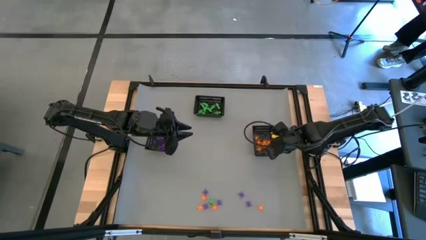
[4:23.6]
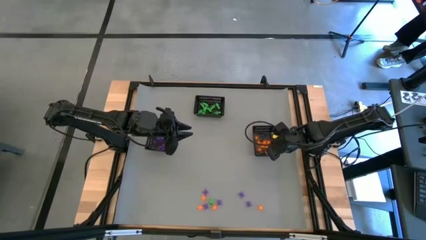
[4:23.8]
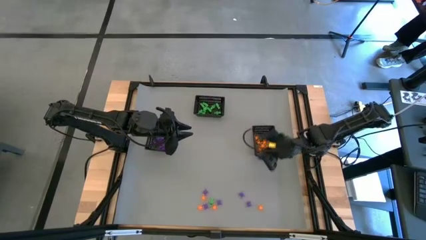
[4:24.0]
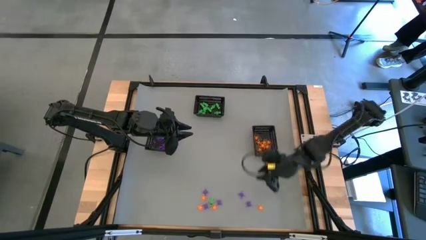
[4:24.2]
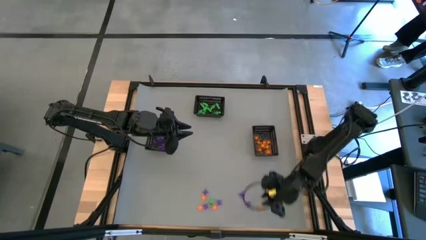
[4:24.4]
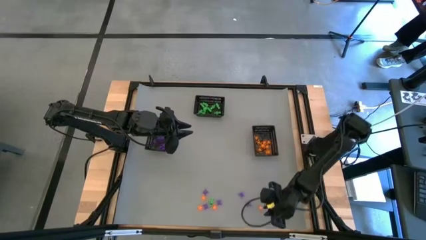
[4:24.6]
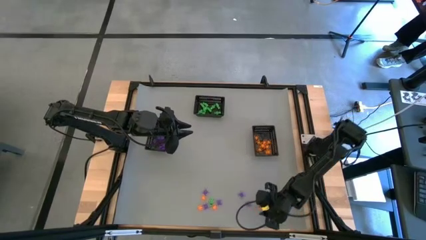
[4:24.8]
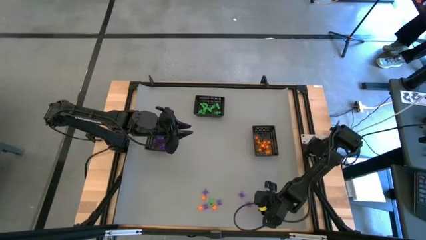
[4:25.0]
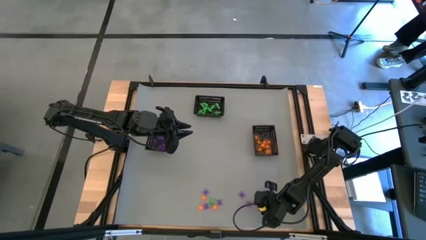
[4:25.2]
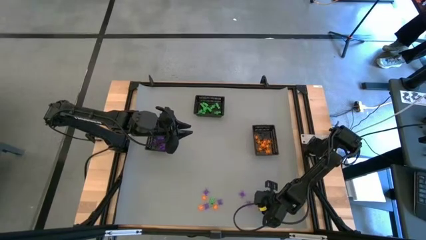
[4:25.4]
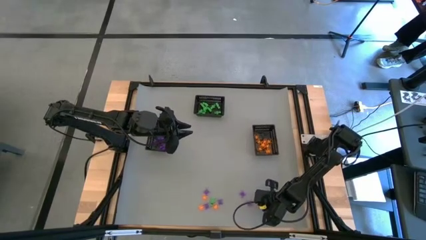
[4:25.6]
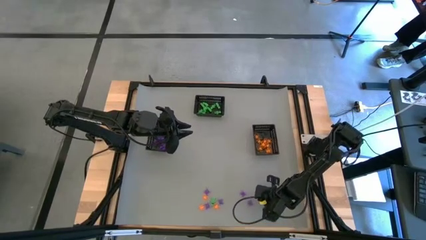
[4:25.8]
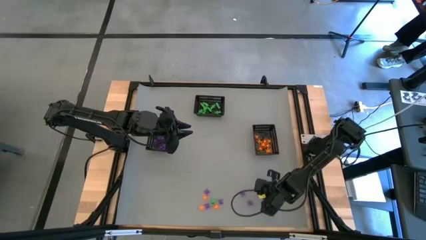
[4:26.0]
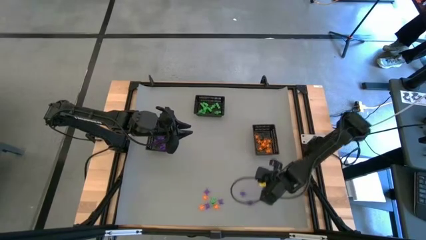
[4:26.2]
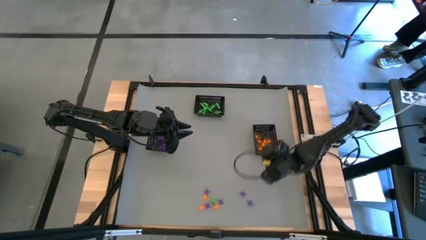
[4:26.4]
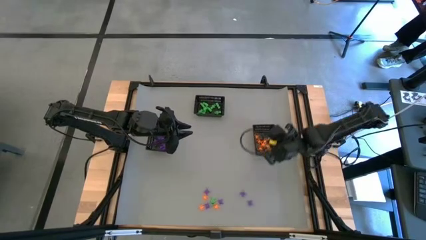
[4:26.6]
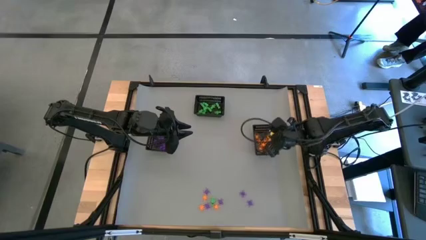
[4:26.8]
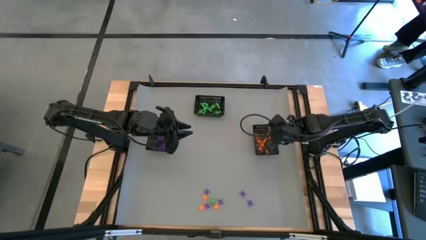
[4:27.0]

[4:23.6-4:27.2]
Task: Sort Halloween decoration
Put the orange spider toy into the right bin

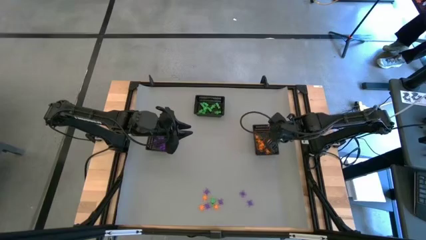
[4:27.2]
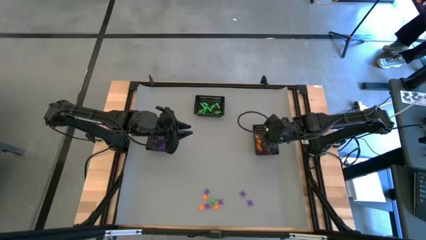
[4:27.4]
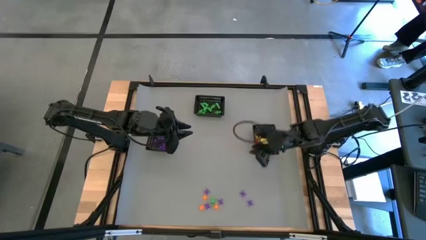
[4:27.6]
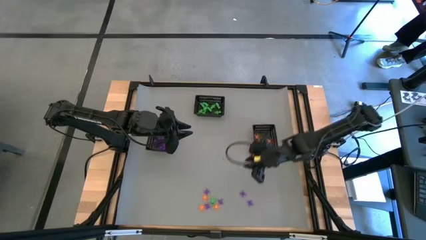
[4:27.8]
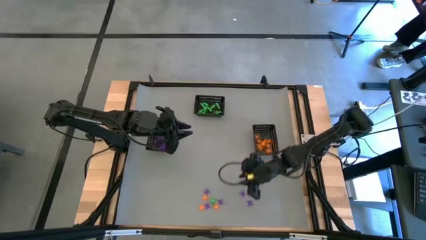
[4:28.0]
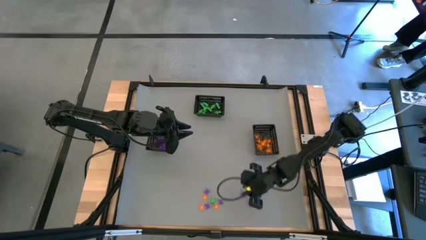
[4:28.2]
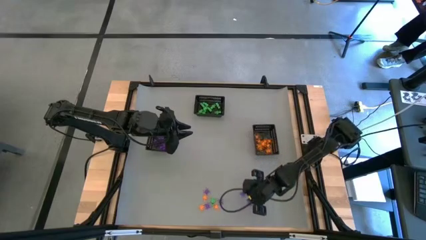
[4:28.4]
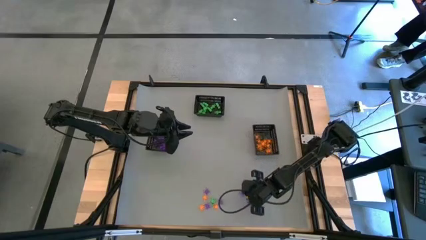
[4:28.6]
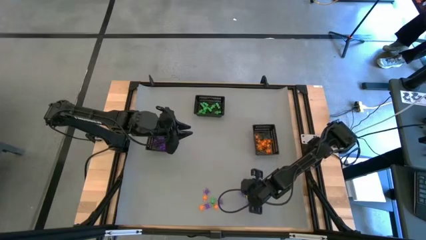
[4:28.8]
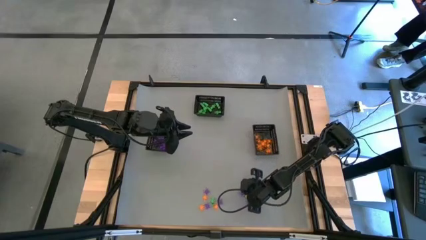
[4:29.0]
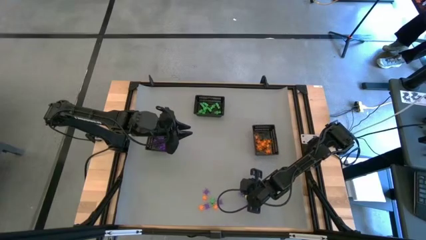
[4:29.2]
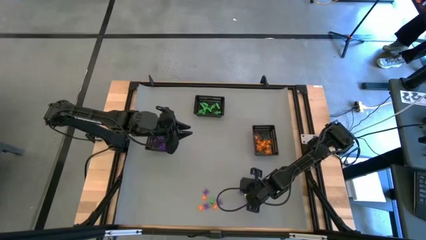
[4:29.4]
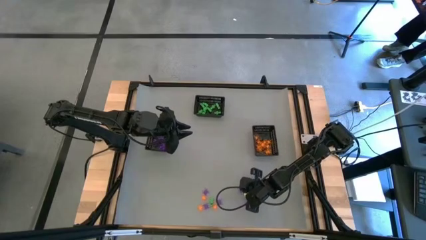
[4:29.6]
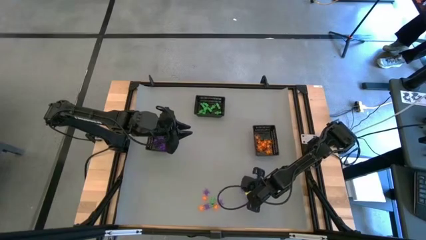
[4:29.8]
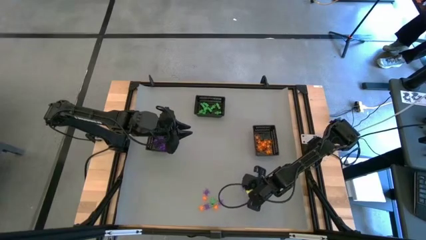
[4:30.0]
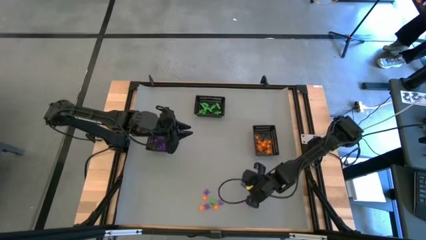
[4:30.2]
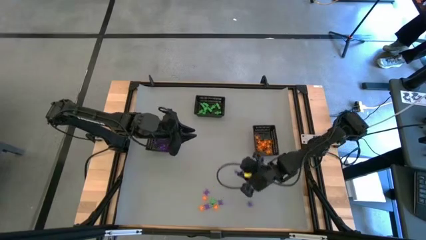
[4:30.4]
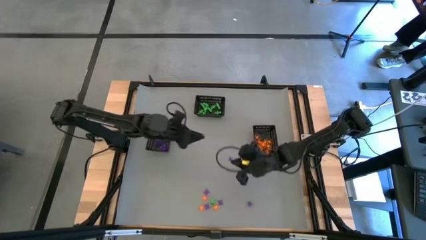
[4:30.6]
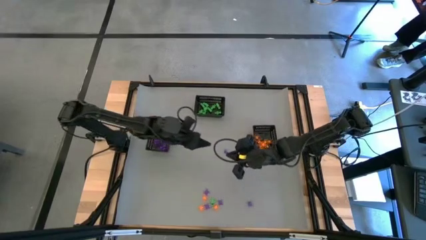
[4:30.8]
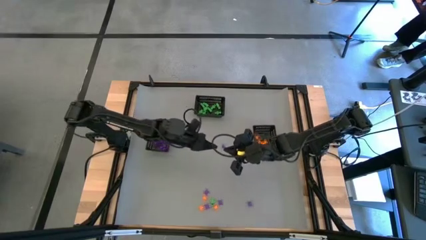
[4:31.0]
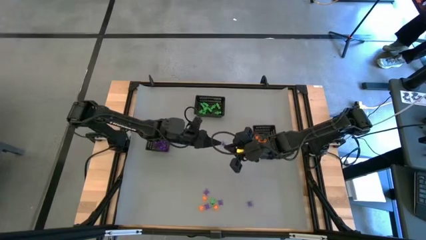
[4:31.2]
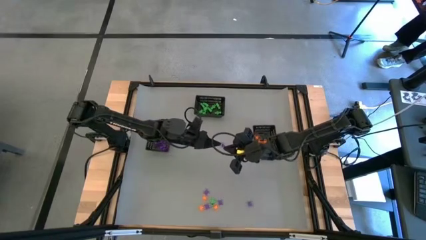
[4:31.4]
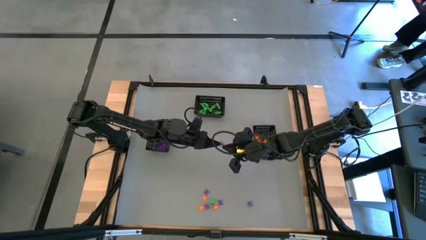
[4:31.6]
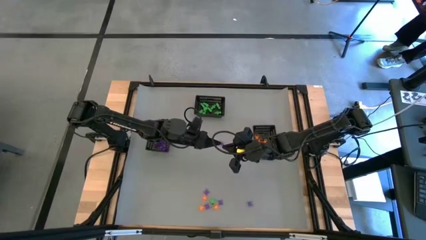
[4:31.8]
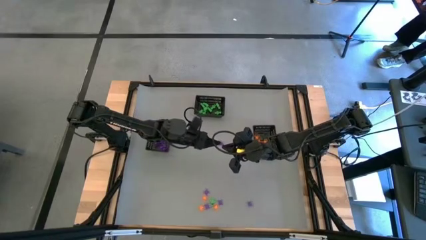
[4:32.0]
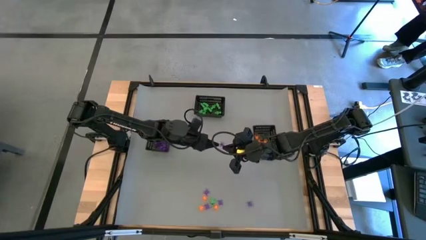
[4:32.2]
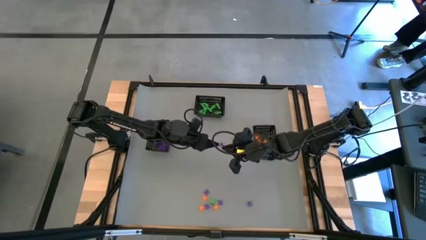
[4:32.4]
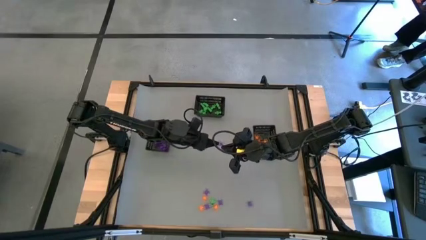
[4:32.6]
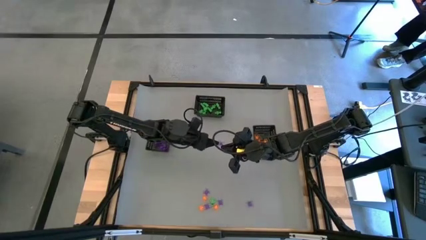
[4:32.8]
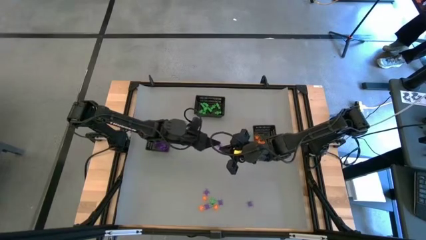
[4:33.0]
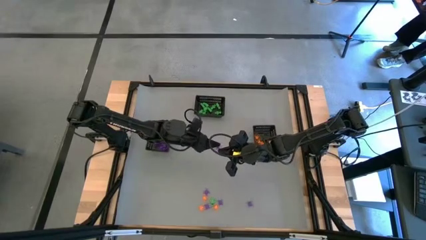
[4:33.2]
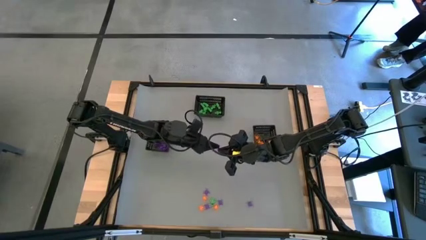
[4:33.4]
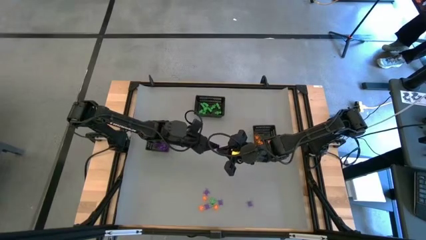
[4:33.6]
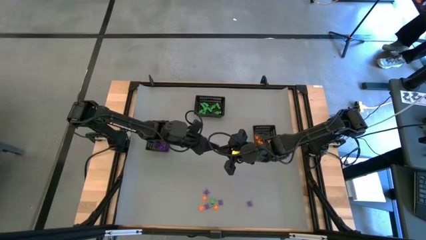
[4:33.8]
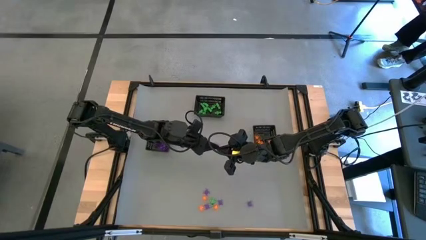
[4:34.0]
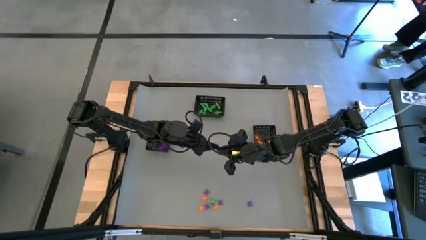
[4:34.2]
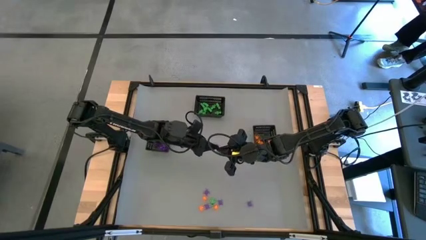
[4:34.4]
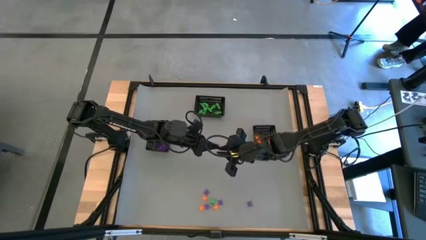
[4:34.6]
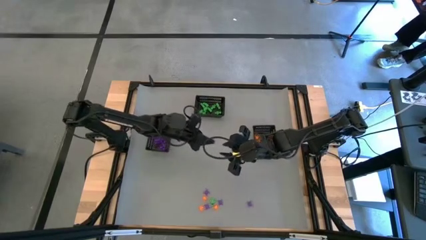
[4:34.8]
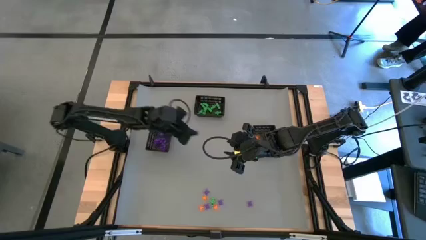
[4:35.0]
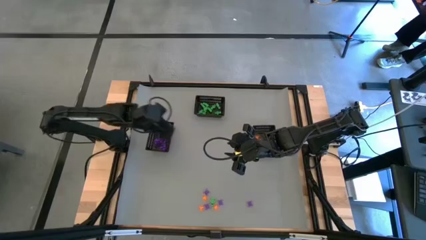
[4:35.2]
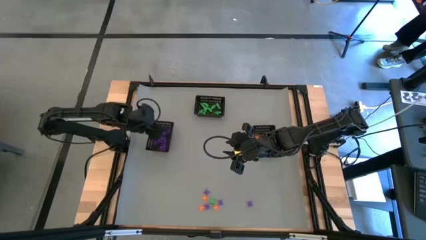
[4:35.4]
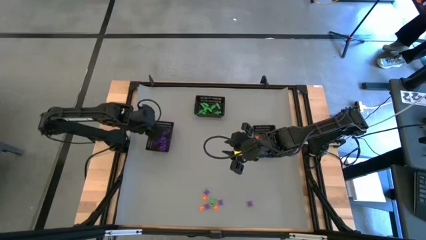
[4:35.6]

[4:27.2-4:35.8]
Put the violet spider toy into the left bin

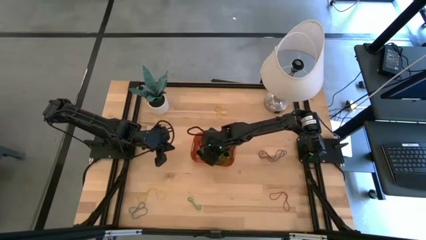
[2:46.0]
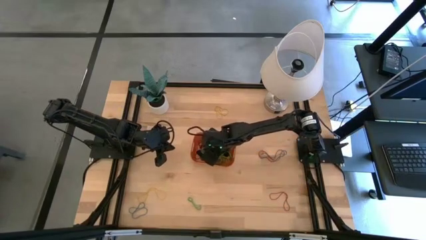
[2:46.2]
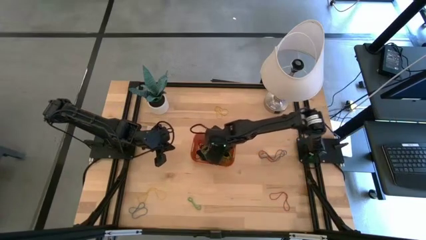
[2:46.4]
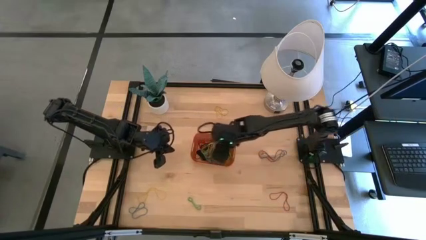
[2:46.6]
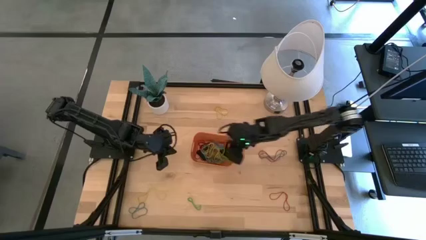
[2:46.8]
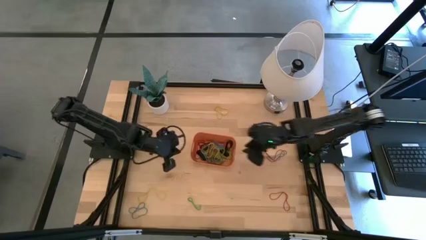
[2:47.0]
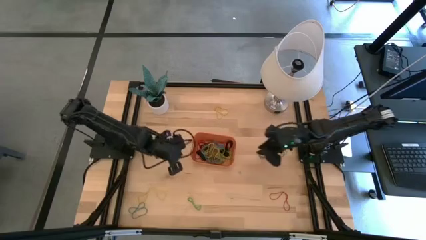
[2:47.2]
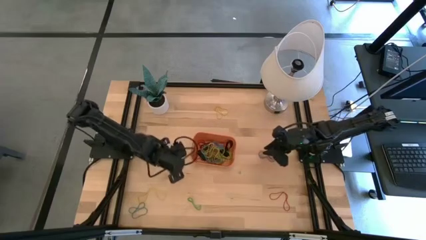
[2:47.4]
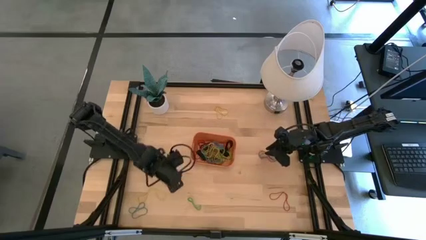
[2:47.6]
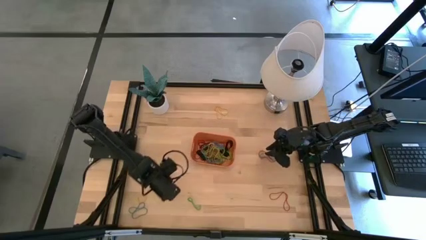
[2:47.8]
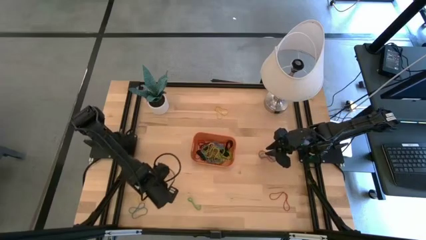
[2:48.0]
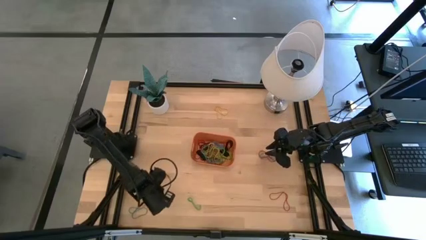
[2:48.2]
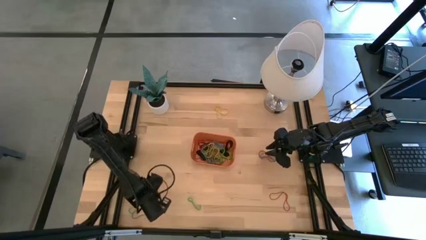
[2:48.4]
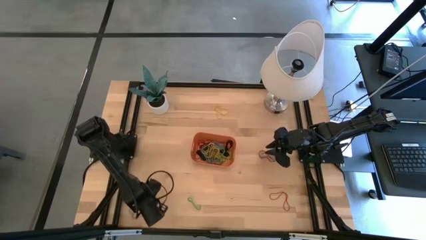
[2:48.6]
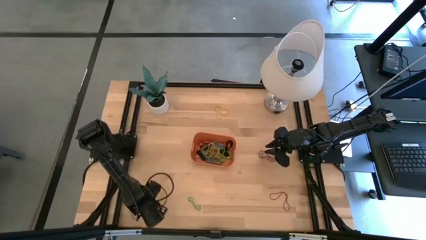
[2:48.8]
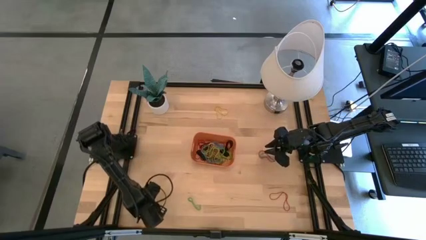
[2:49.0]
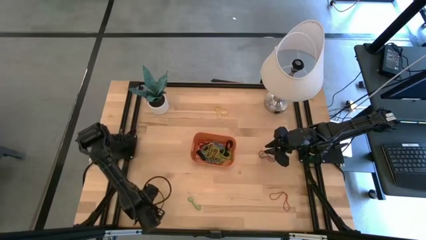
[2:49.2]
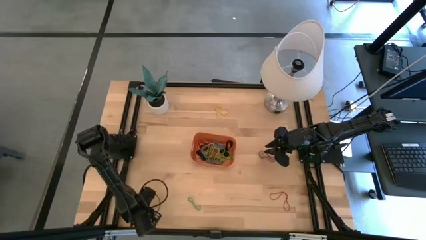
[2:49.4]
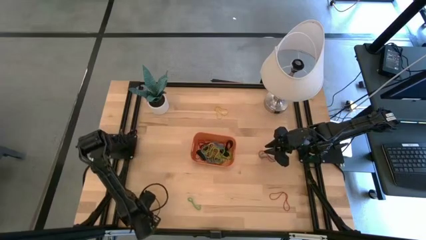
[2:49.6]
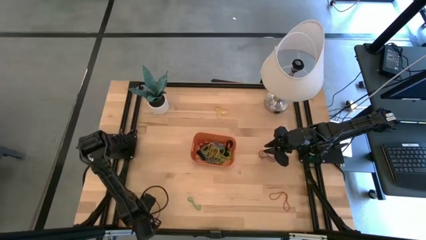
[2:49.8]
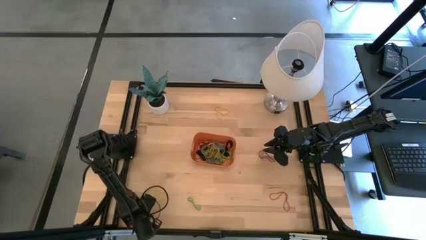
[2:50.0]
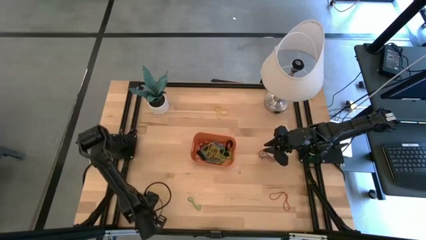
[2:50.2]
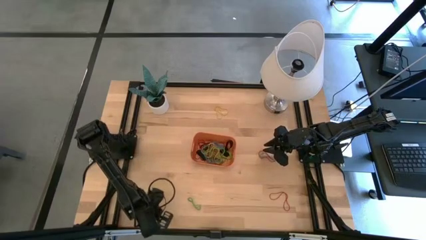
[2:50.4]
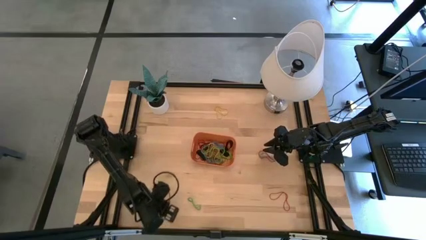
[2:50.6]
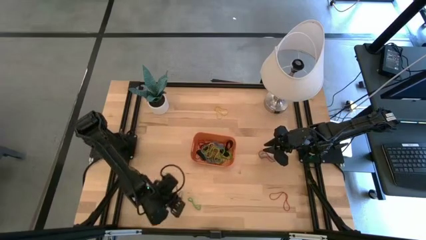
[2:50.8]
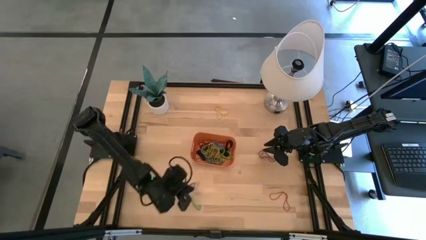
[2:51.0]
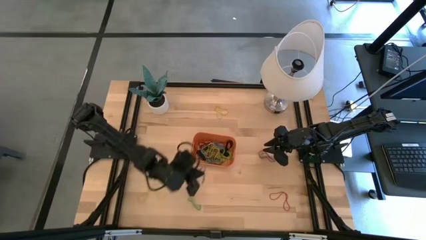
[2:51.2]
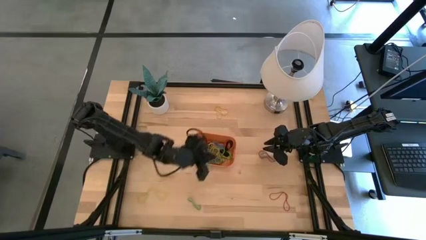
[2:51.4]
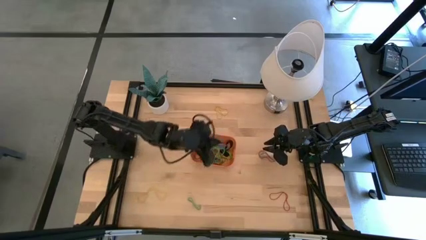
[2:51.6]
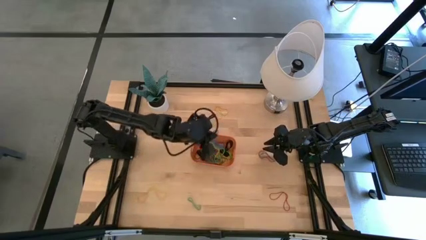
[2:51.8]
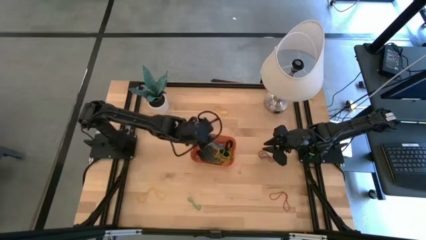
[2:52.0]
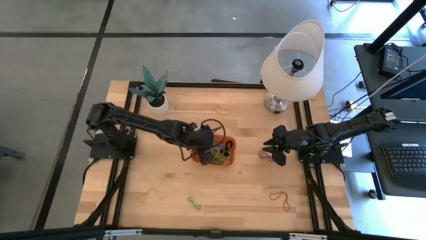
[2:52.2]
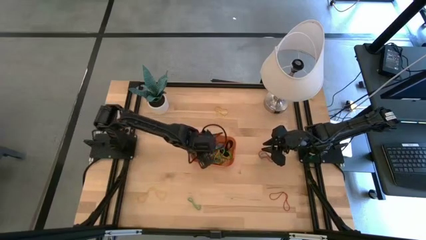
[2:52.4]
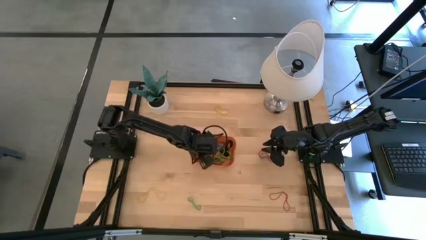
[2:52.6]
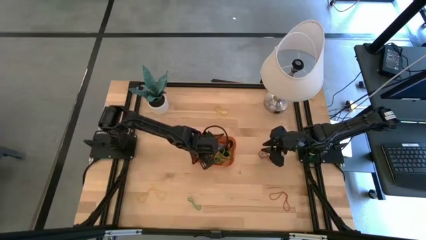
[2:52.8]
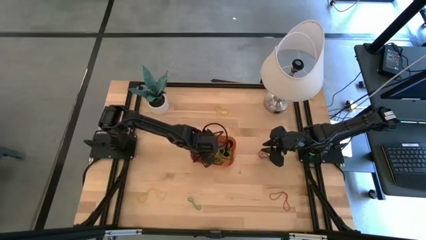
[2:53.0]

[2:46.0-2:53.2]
Task: Pick and place rubber bands into bin
Put the blue rubber band into the orange bin
